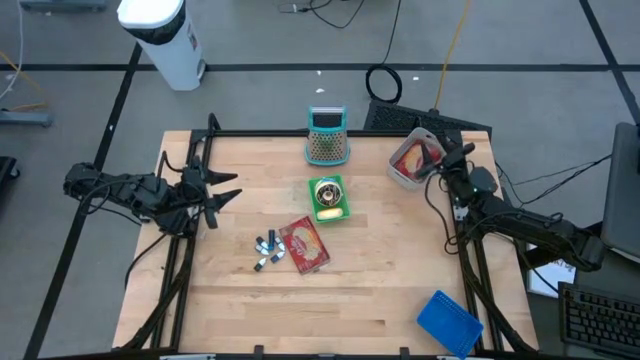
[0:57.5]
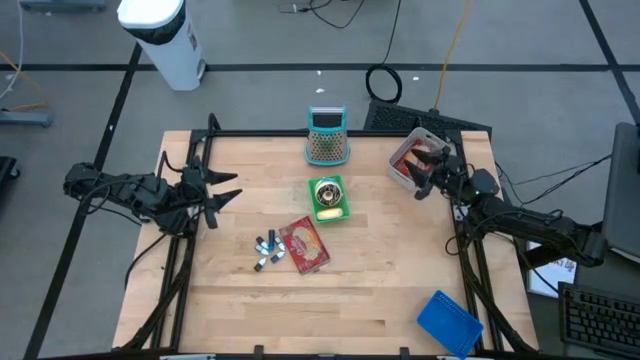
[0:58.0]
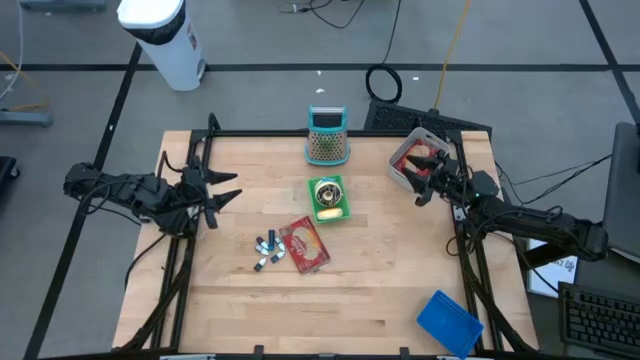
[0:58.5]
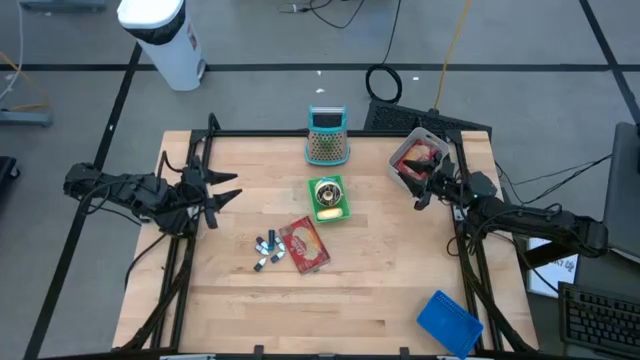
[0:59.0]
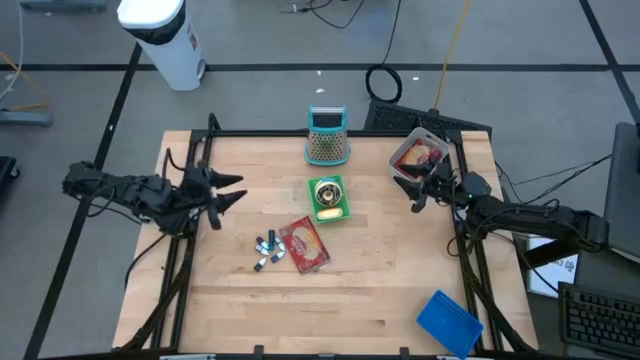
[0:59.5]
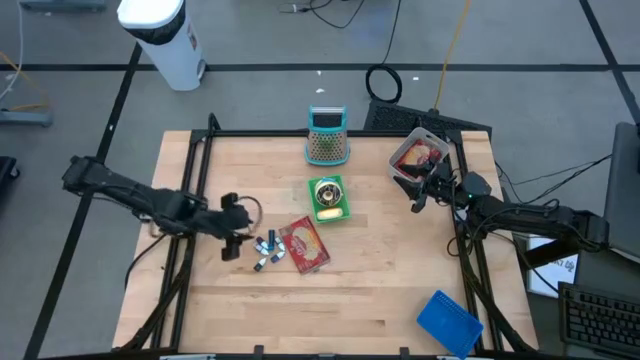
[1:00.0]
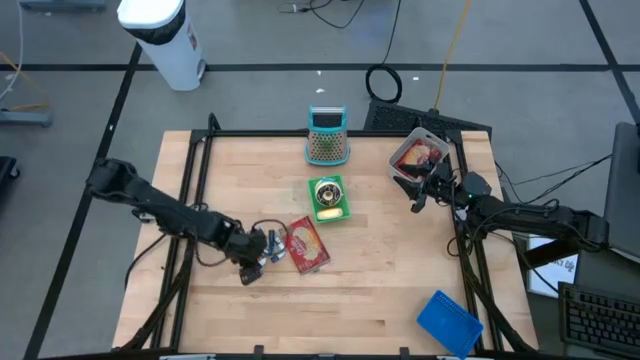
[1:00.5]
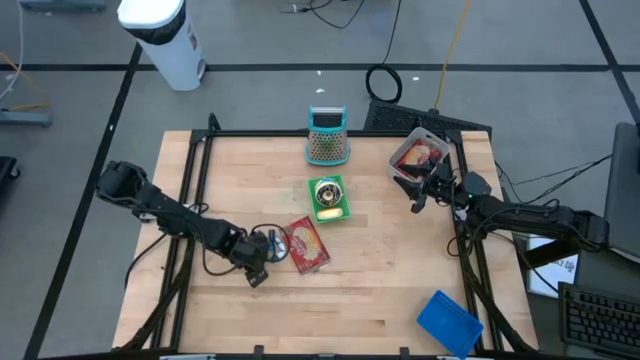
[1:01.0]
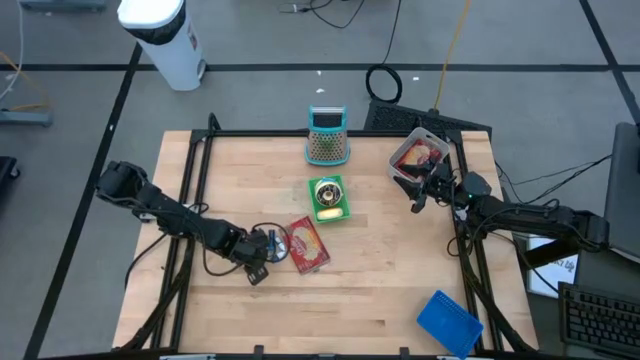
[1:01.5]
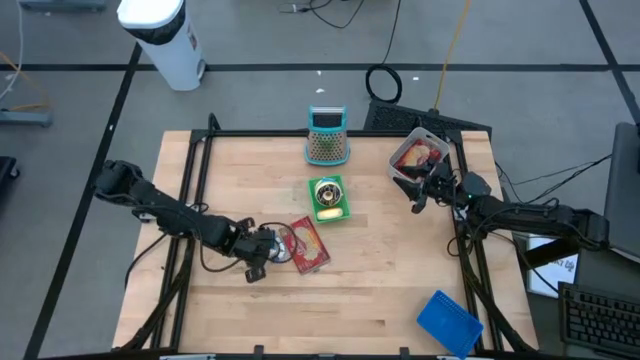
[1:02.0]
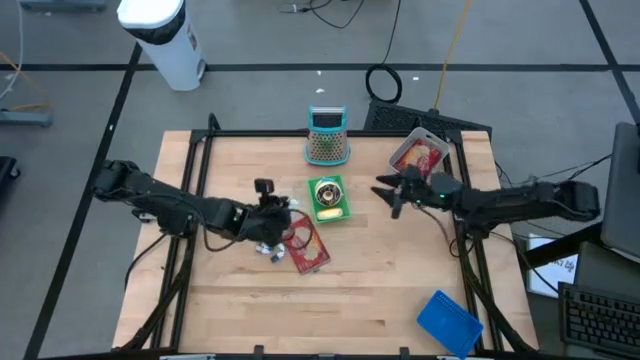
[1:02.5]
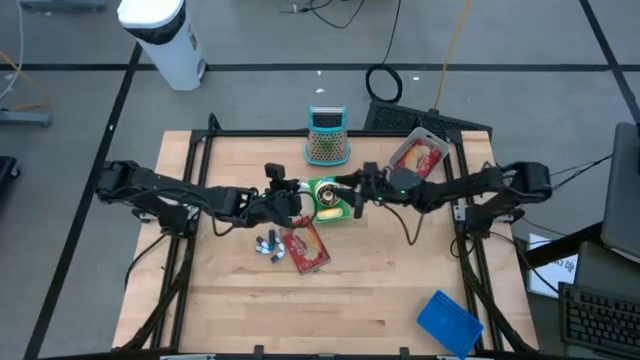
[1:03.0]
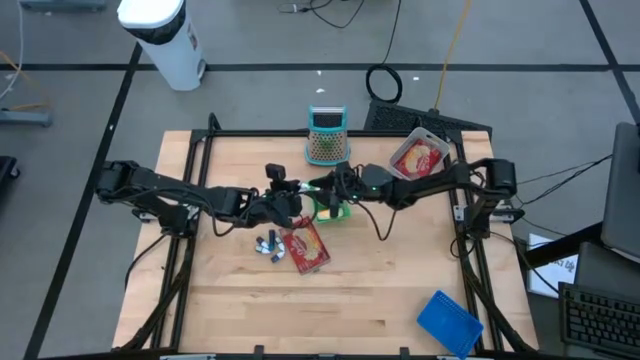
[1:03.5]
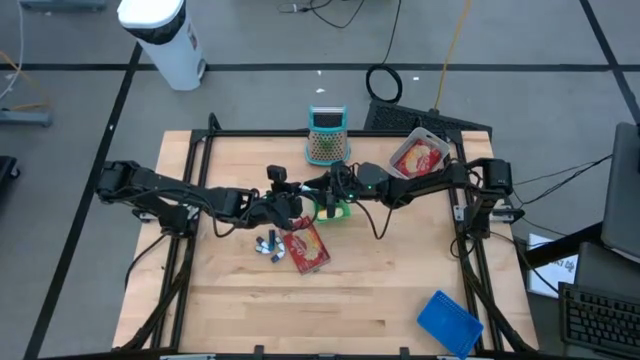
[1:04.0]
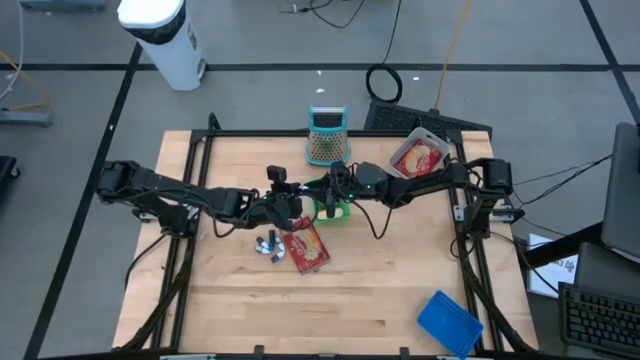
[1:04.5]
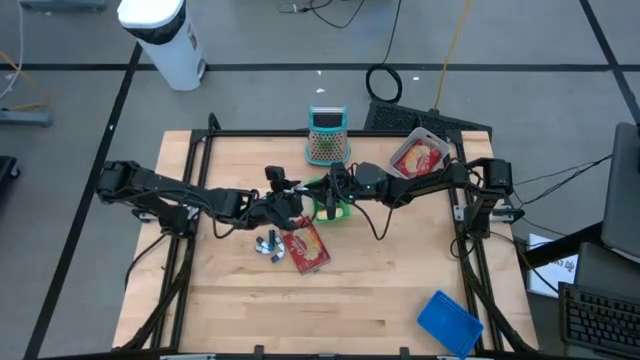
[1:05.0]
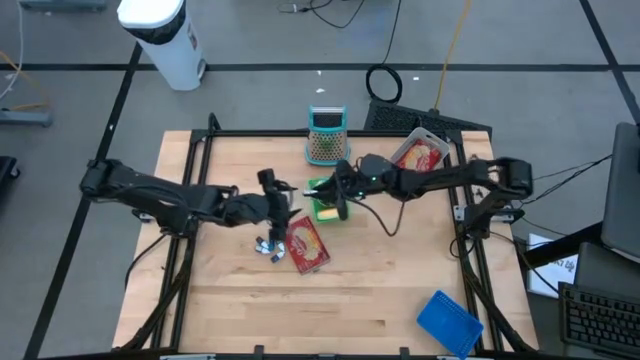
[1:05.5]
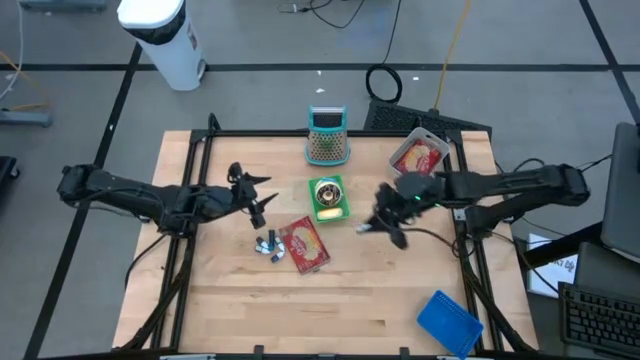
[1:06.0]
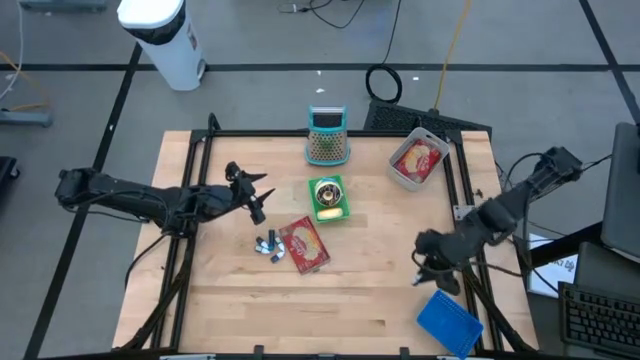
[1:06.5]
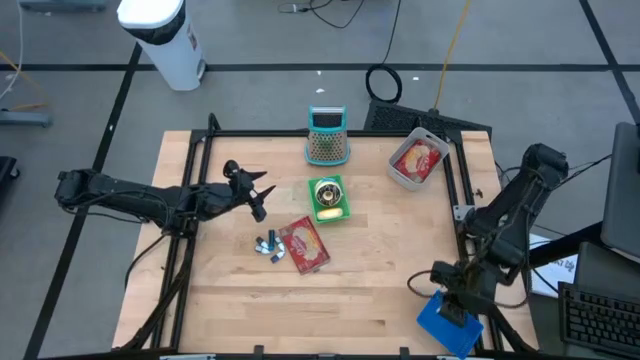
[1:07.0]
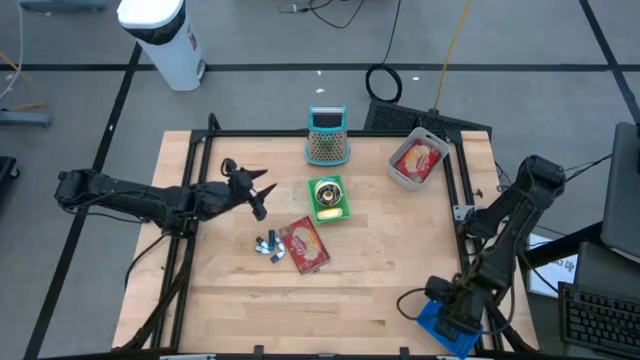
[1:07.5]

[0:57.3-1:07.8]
Put the bottom green food coloring bottle into the blue bin

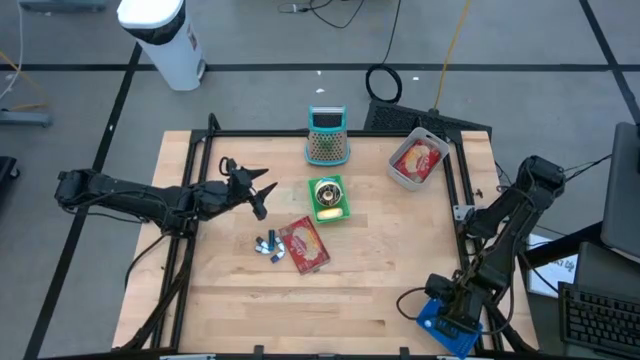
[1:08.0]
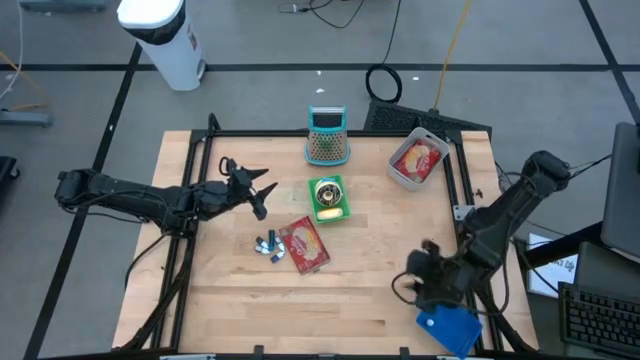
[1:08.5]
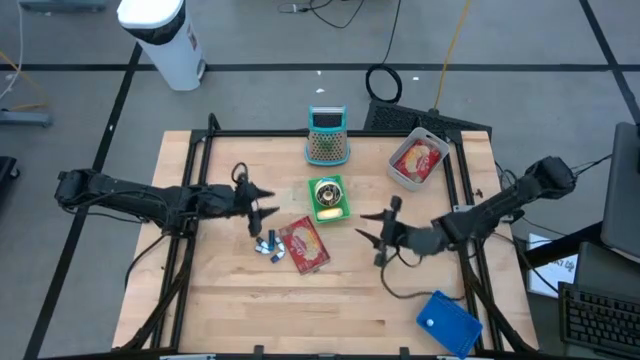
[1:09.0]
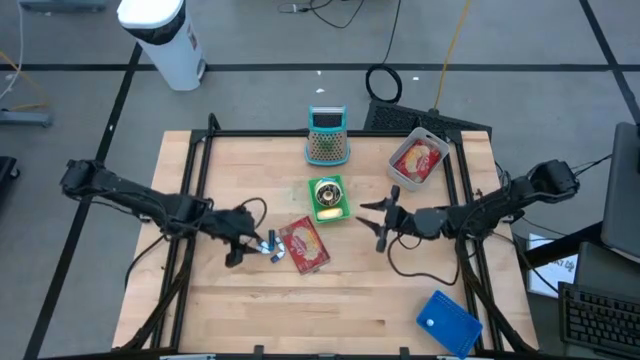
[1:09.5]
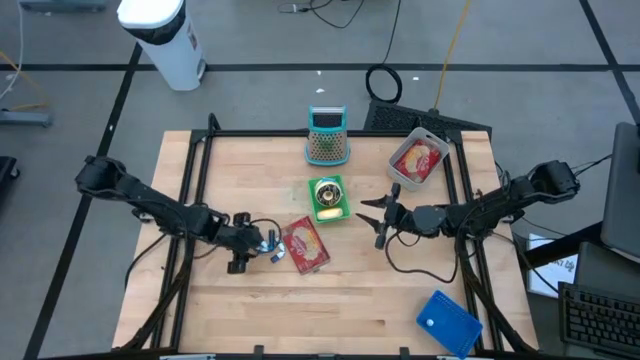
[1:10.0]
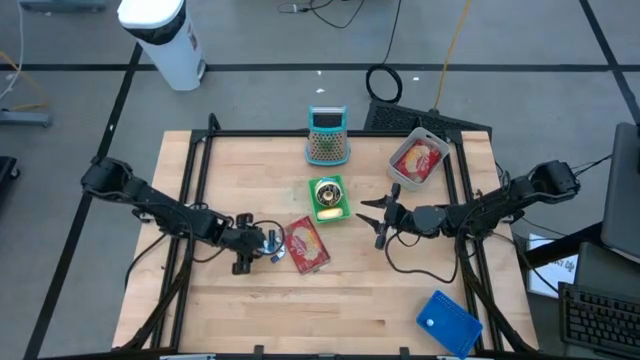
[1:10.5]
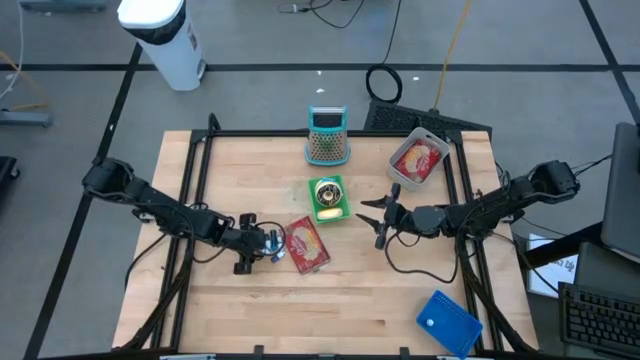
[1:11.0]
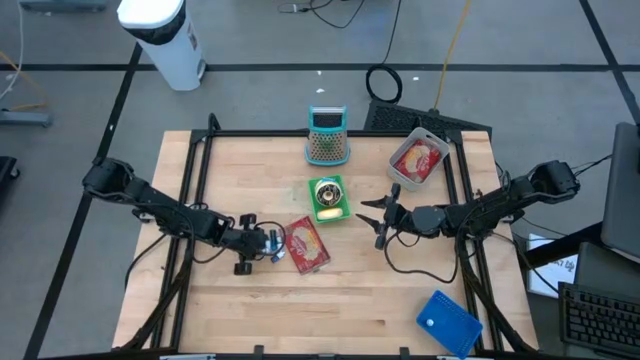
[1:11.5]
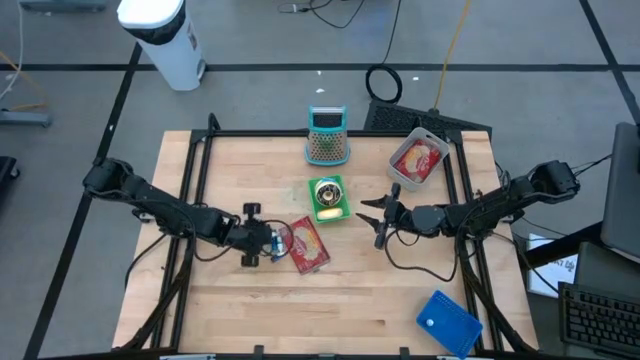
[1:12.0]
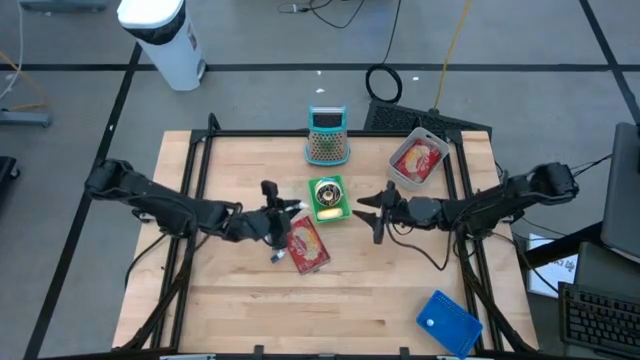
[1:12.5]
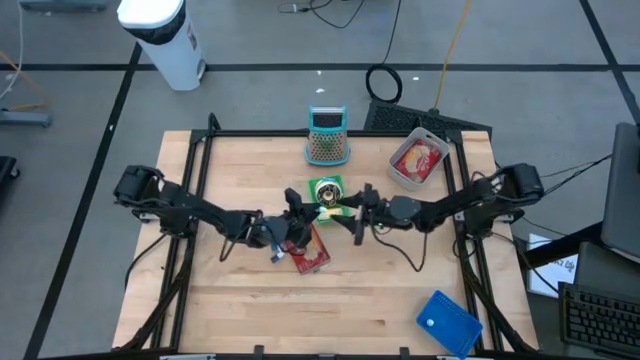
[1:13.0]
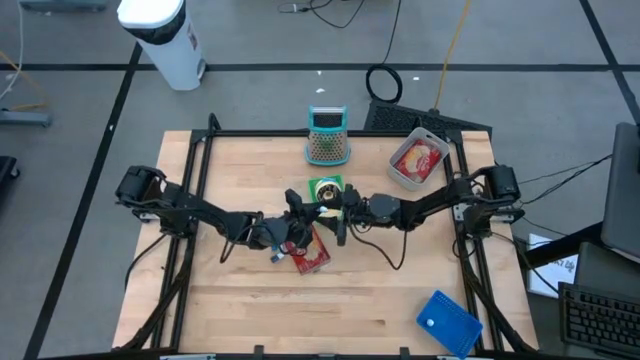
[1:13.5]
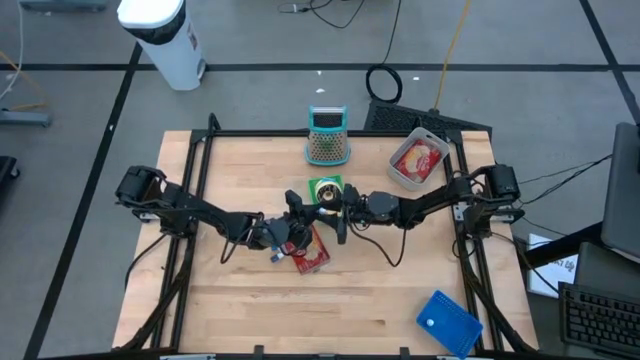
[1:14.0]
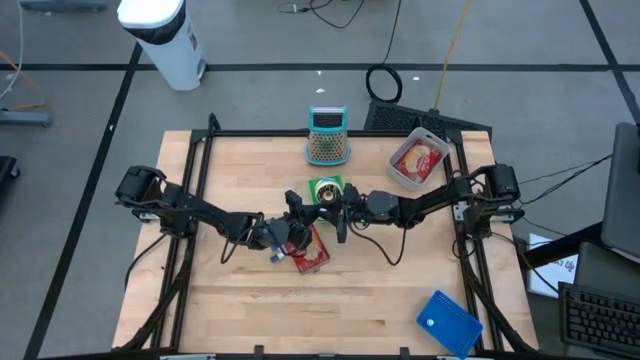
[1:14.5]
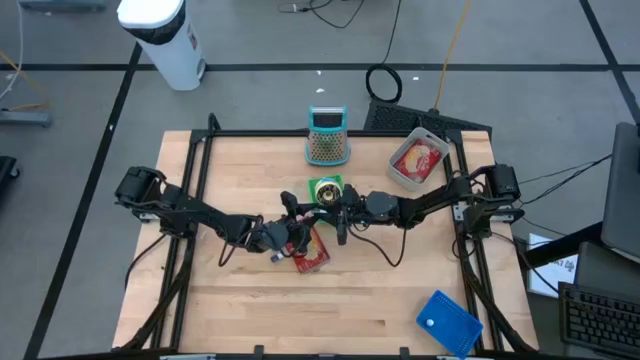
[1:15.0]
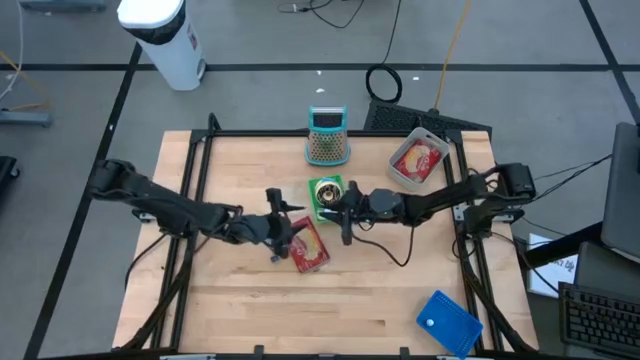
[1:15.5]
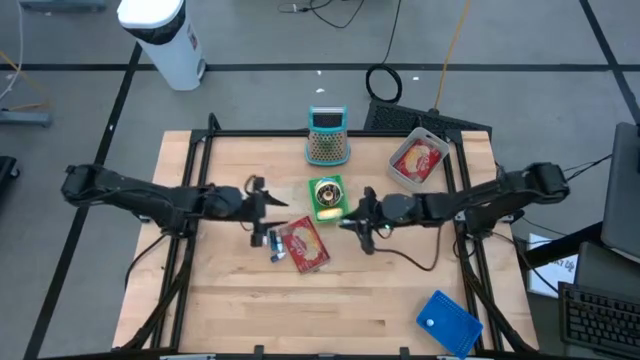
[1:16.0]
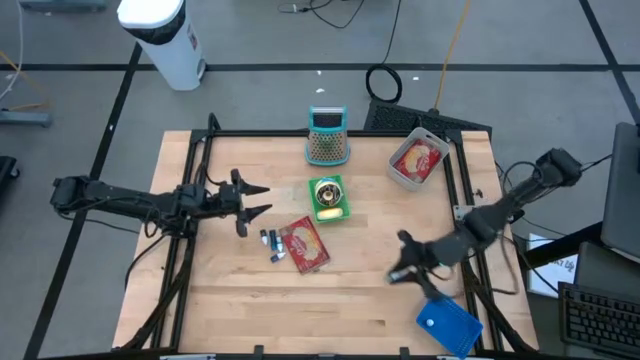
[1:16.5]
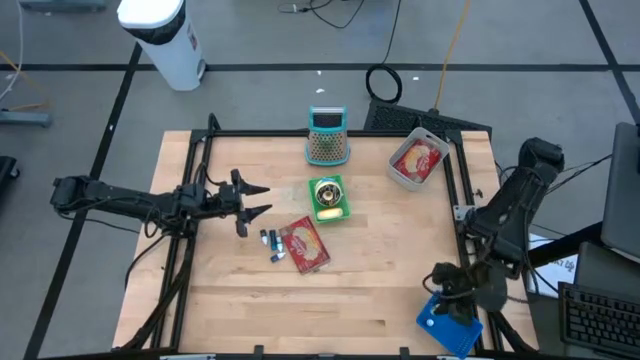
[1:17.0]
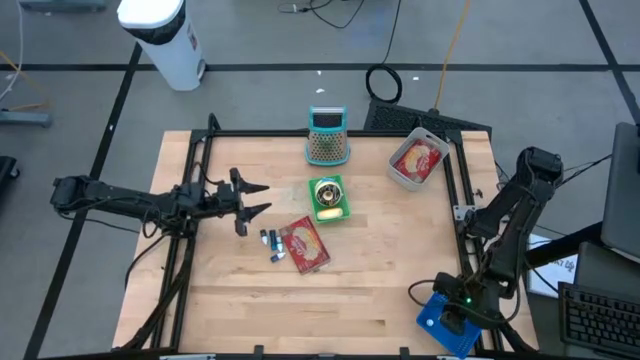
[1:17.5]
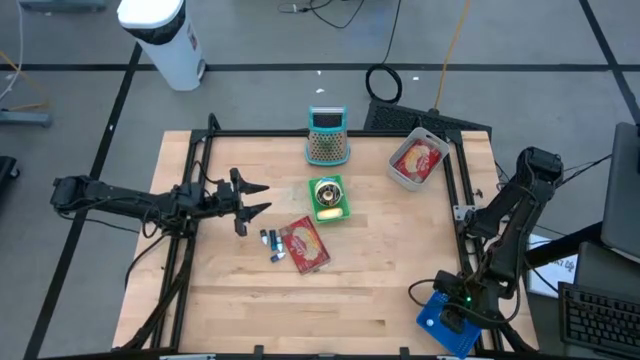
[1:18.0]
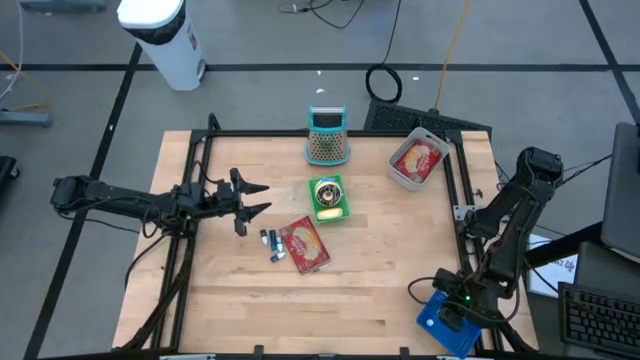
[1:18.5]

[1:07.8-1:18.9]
Put the green food coloring bottle into the blue bin
